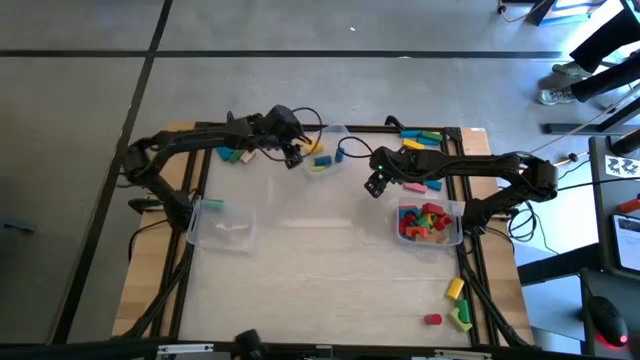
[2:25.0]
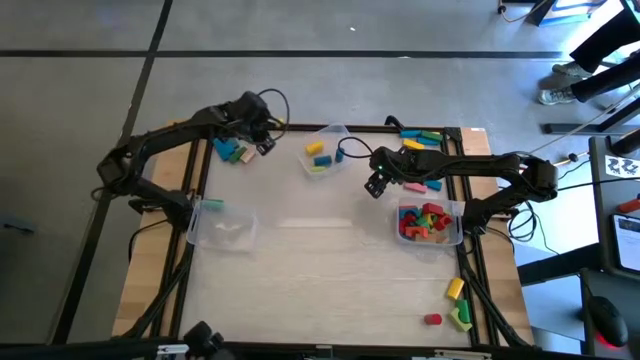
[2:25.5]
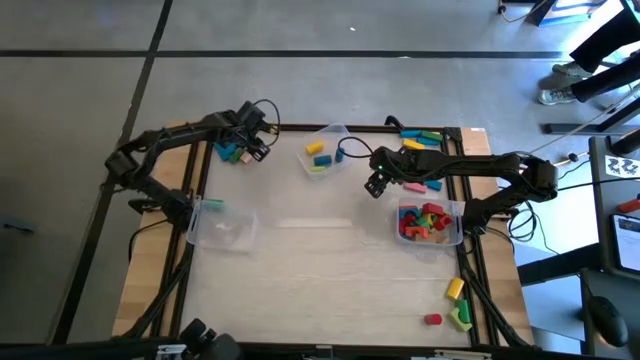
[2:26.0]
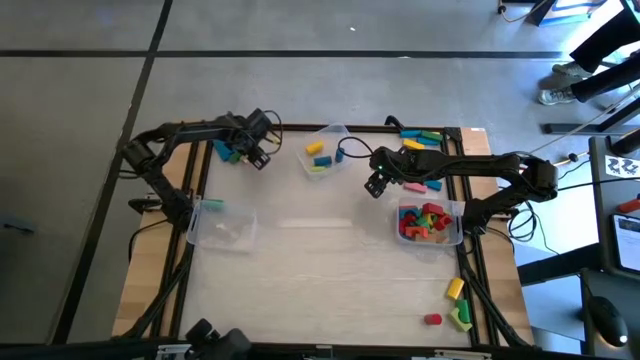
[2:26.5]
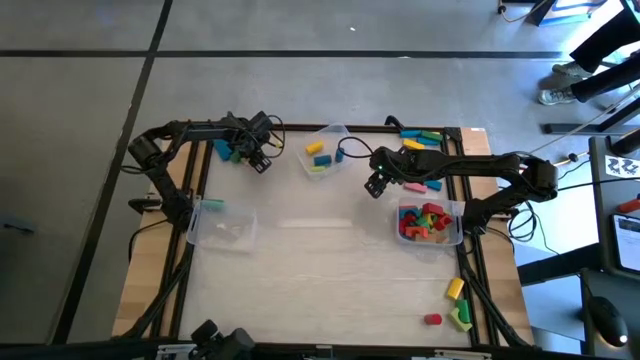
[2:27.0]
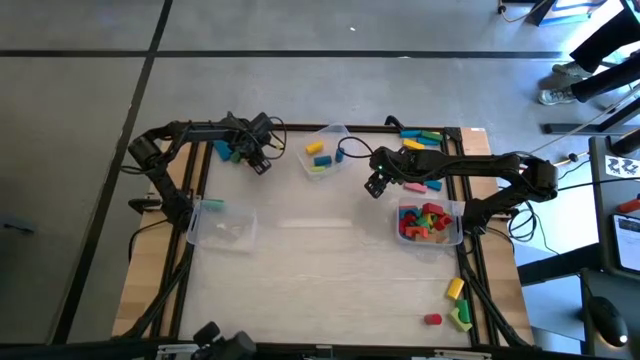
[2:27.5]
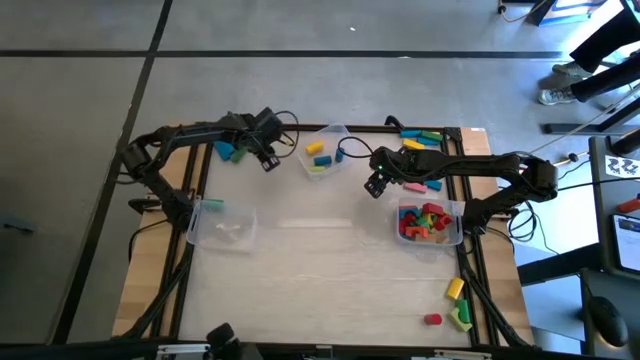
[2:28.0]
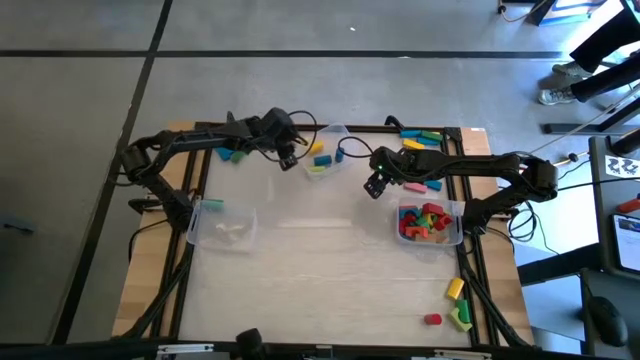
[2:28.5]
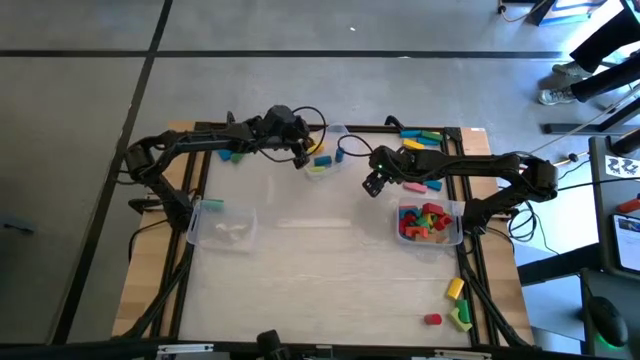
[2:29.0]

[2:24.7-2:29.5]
Task: Sort blocks by size
Put the brown cylindrical block into the top transparent bin

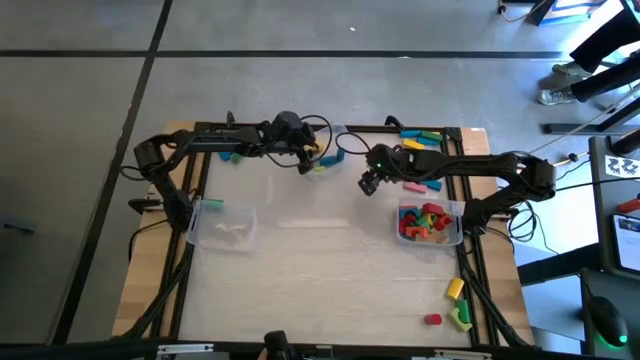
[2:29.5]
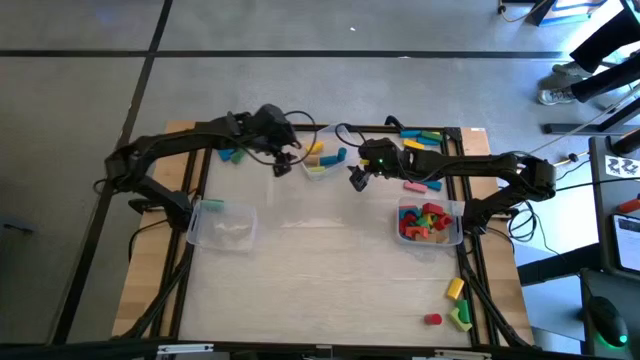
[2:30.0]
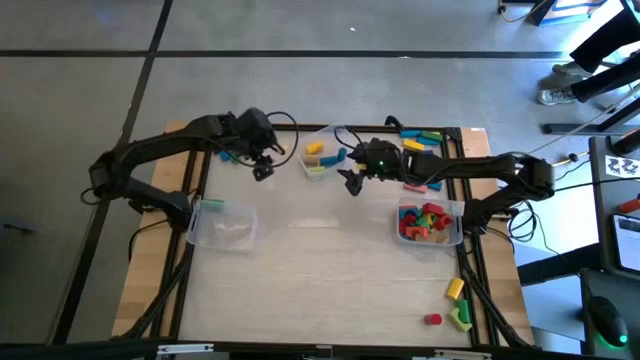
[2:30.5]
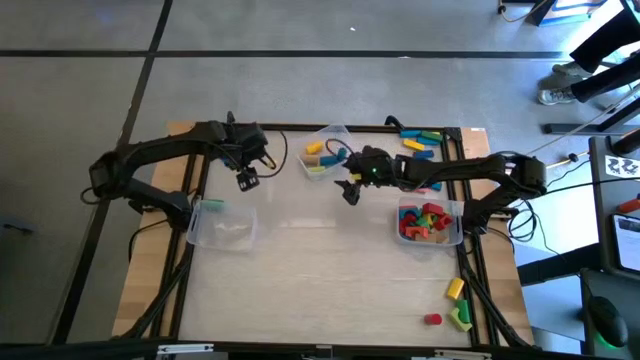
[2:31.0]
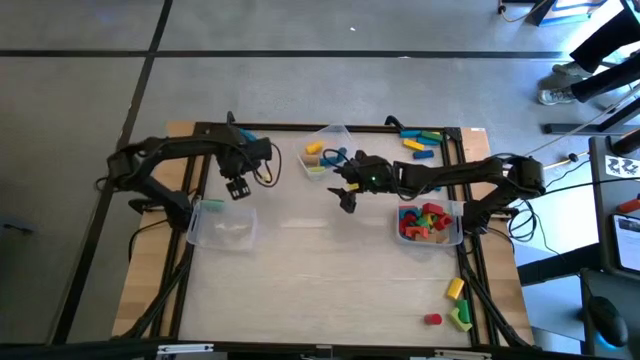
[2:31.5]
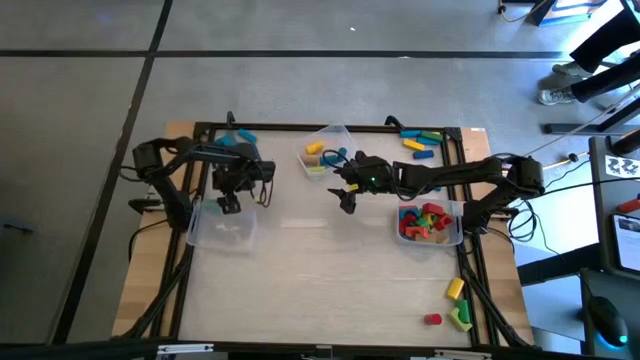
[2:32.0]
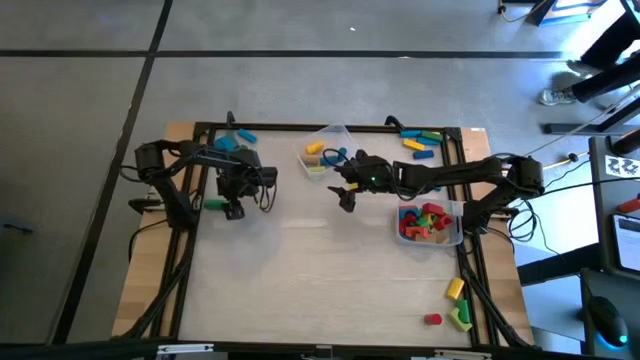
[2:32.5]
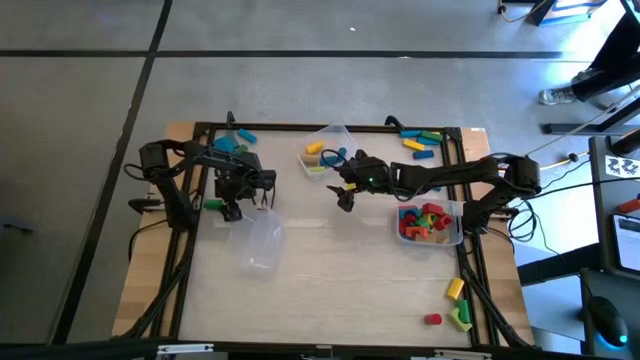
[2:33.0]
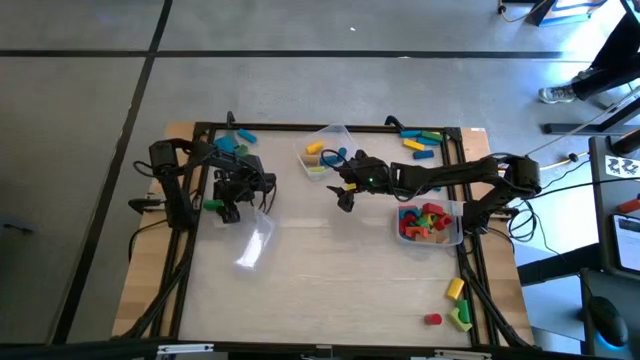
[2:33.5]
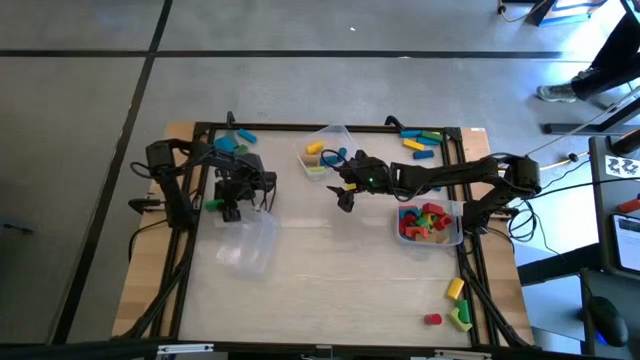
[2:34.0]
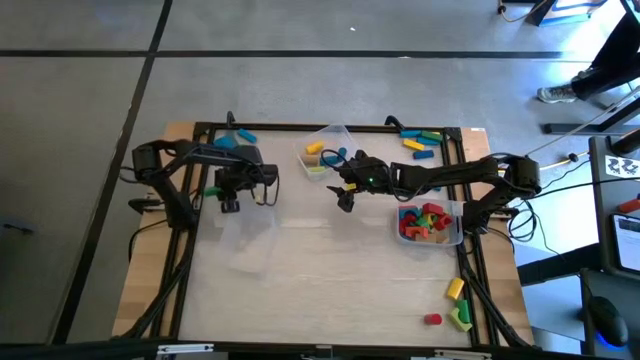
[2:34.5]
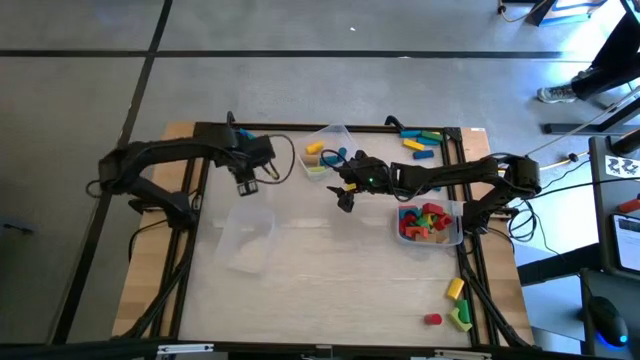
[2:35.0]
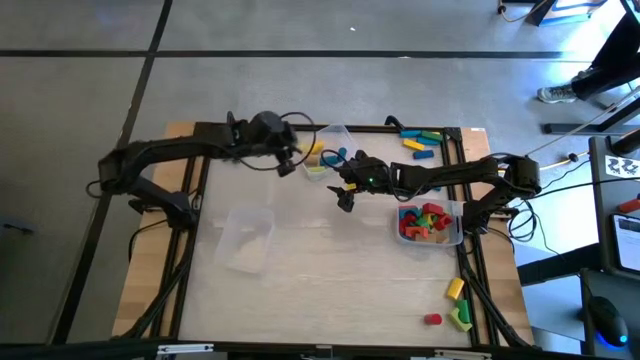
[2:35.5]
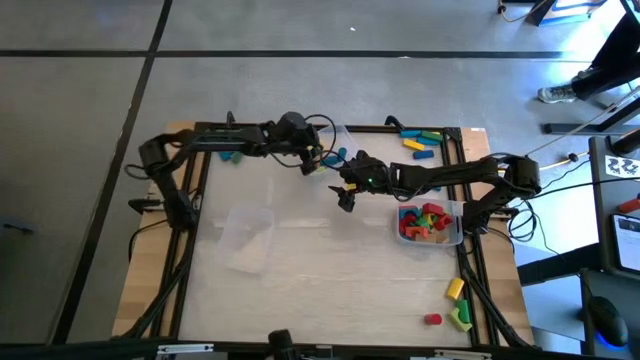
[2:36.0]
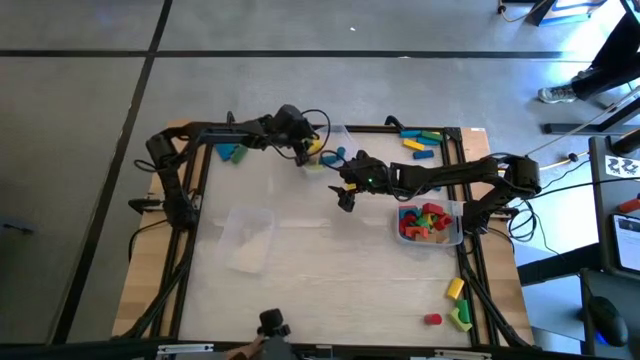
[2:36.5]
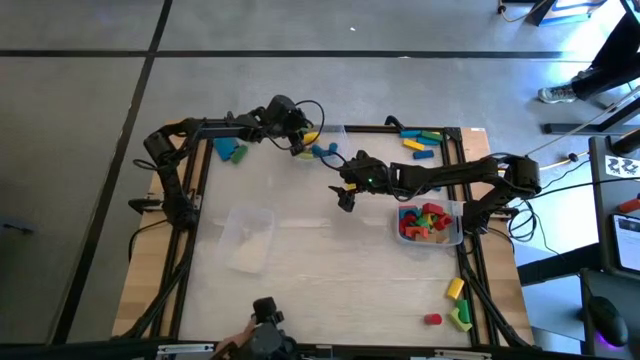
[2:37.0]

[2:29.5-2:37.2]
Put the green cylindrical block into the top transparent bin

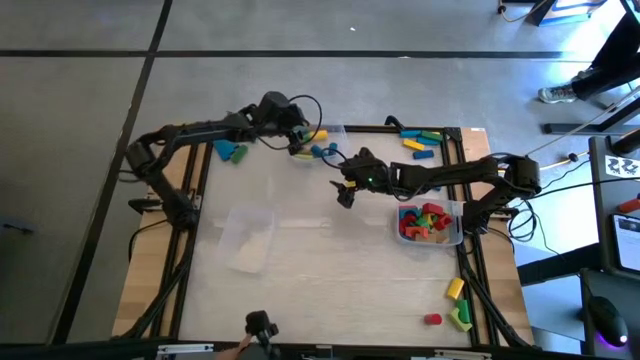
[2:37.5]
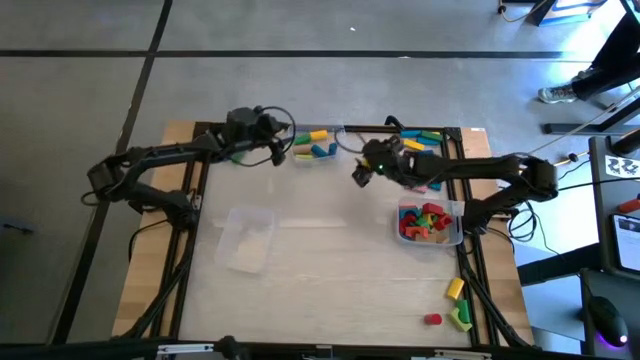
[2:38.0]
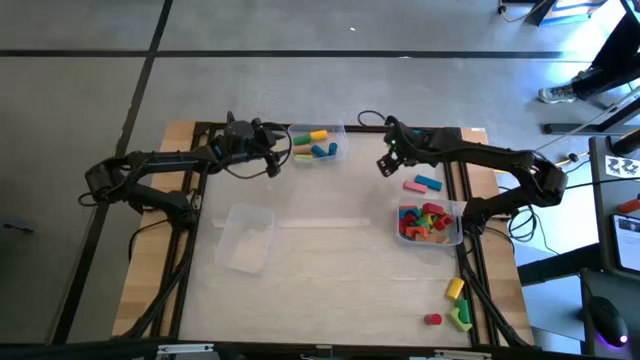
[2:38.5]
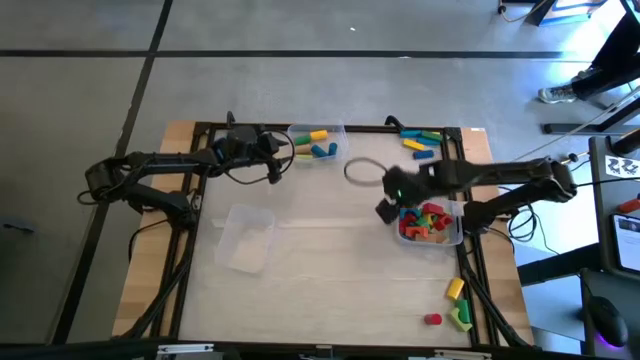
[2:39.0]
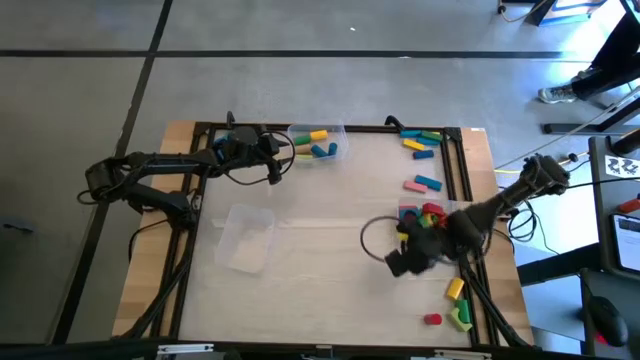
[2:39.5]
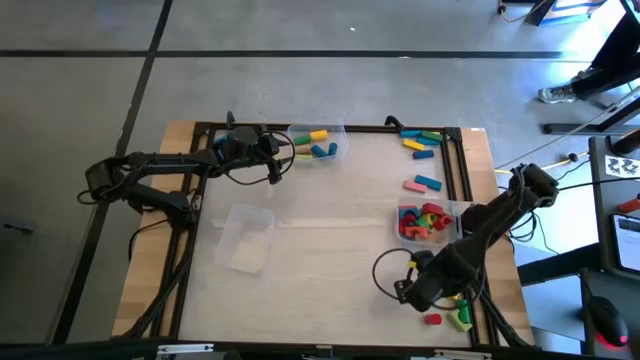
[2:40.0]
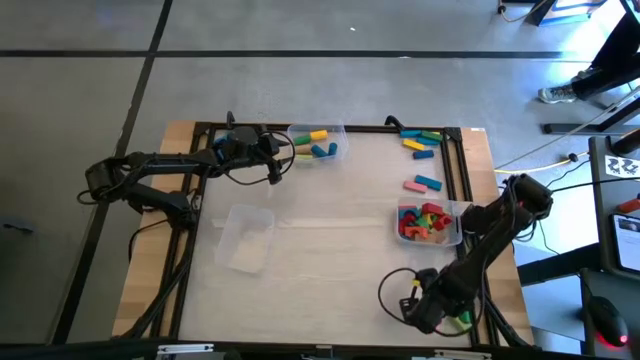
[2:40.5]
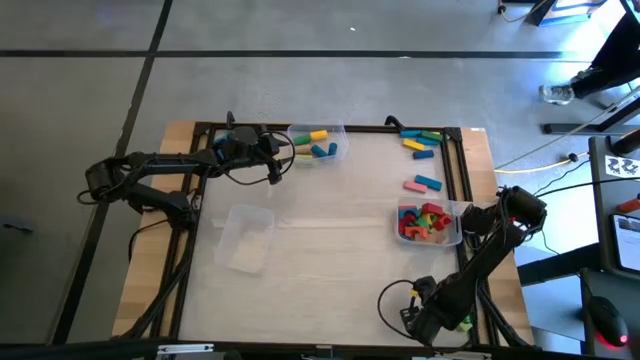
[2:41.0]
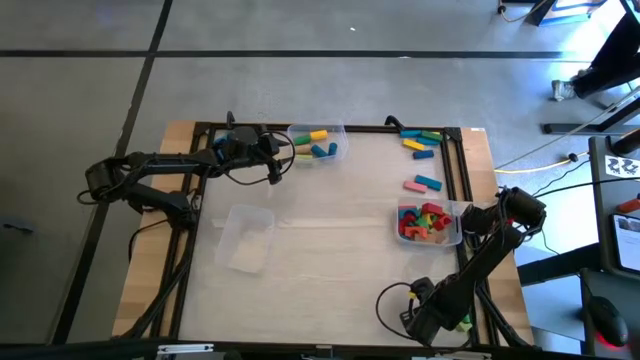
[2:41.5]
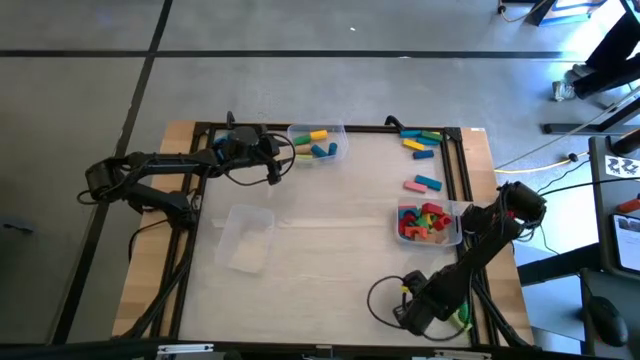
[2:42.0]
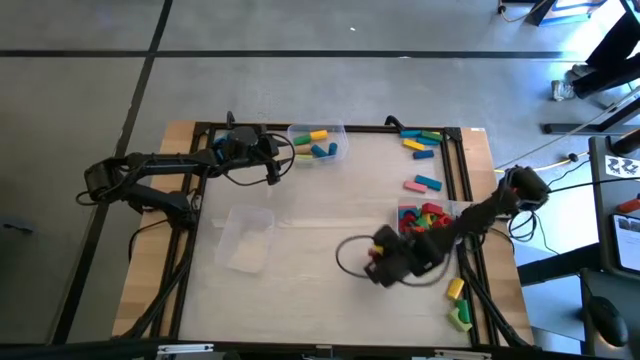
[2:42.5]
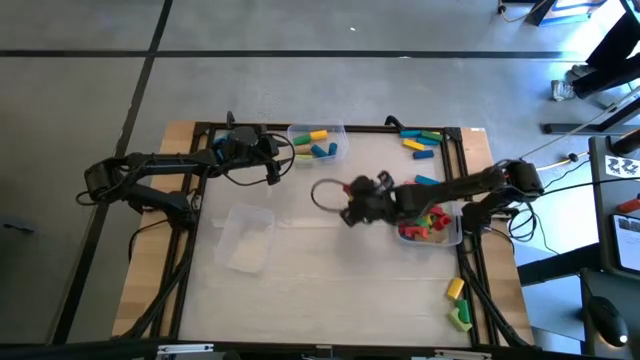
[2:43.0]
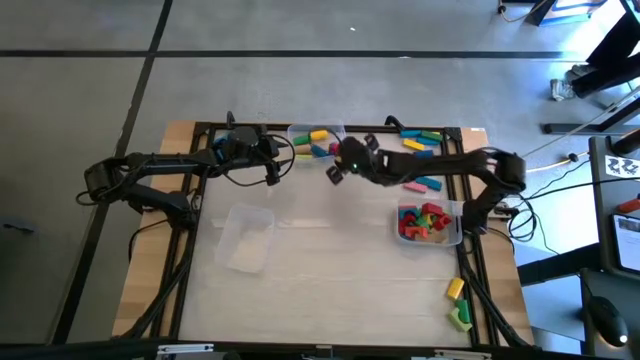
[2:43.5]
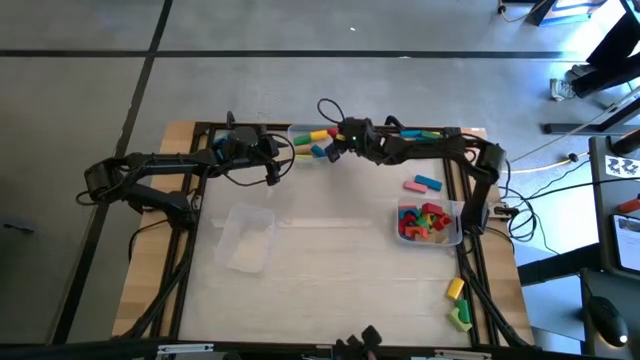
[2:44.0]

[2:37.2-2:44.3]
Put the red cylindrical block into the top transparent bin

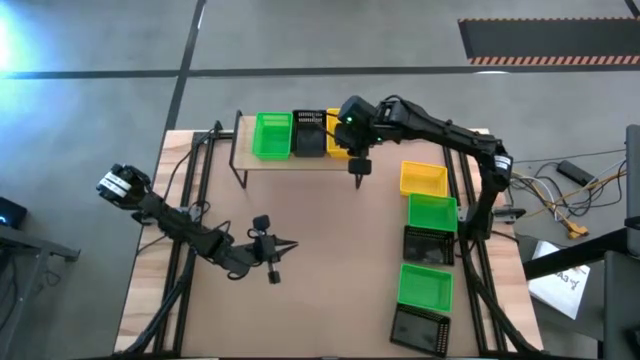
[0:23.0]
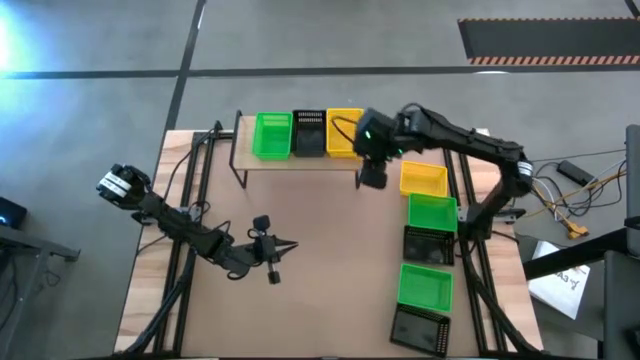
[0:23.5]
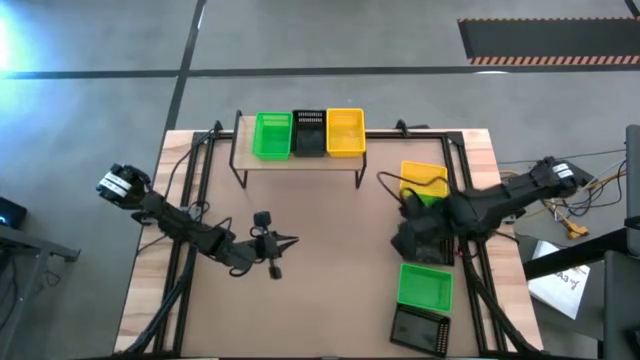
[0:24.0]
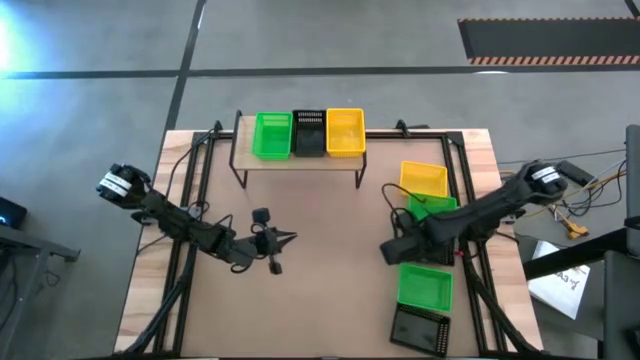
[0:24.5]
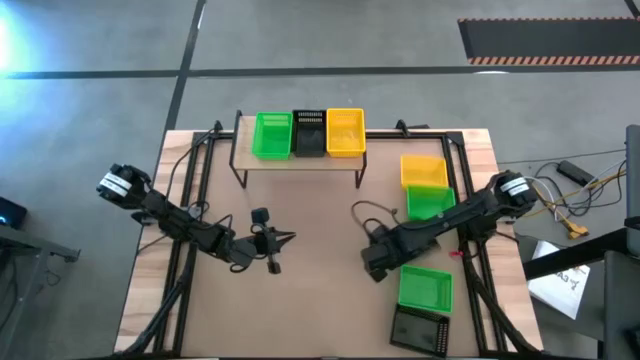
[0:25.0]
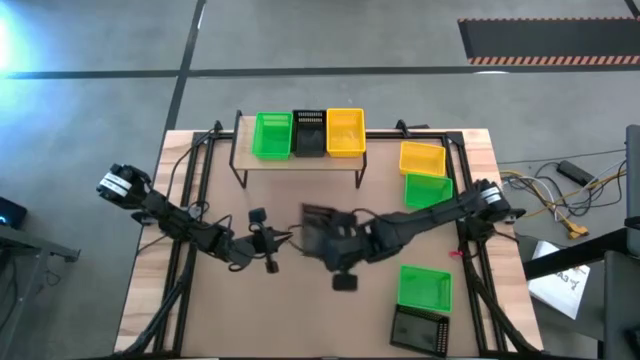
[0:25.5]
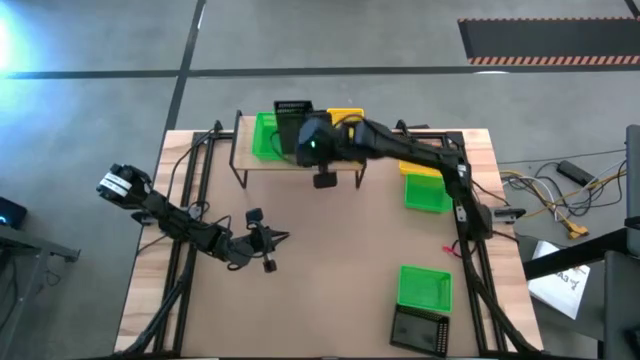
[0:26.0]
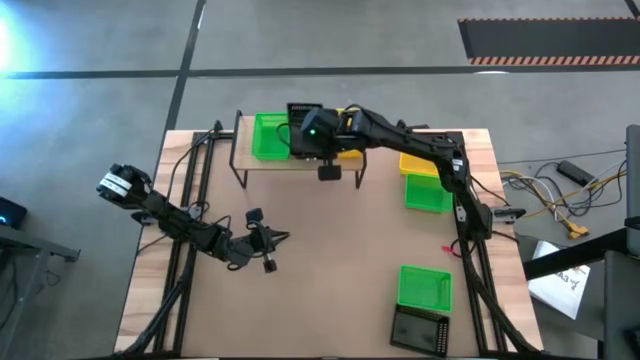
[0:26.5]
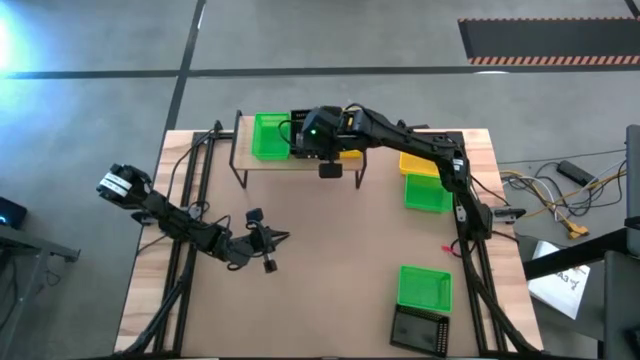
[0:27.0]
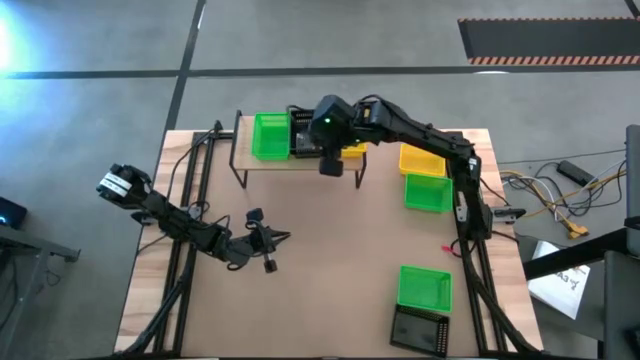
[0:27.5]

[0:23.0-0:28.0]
Task: Stack baskets on shelf by color
Stack the top black bin on the black bin on the shelf
